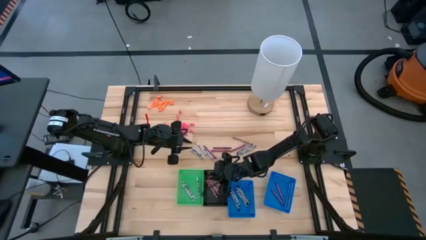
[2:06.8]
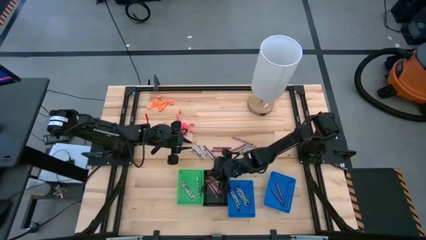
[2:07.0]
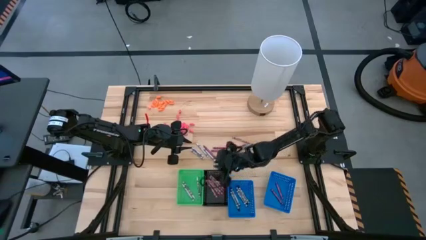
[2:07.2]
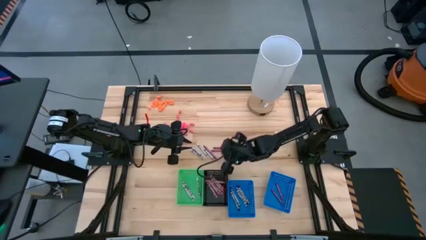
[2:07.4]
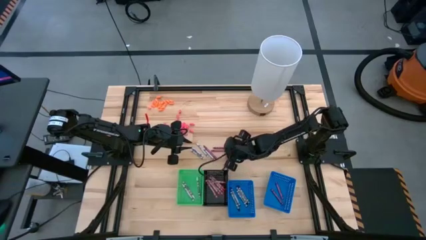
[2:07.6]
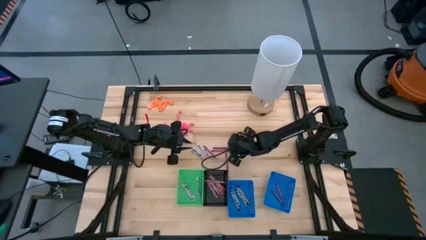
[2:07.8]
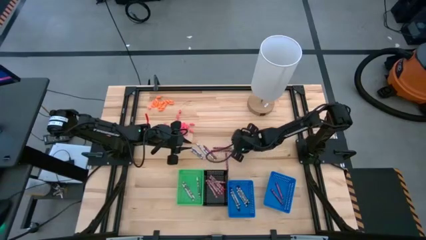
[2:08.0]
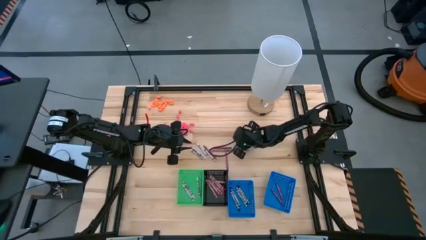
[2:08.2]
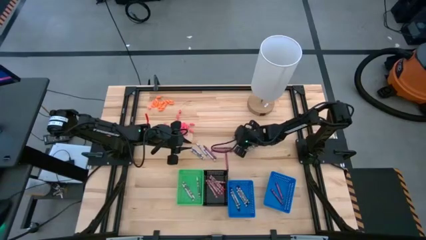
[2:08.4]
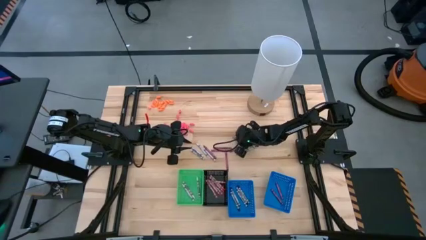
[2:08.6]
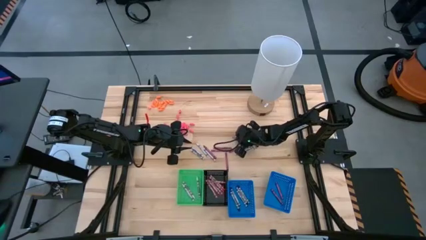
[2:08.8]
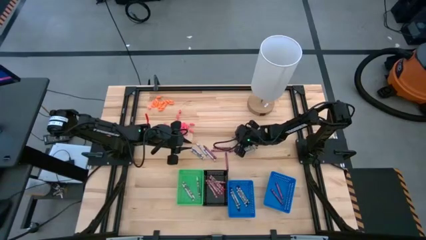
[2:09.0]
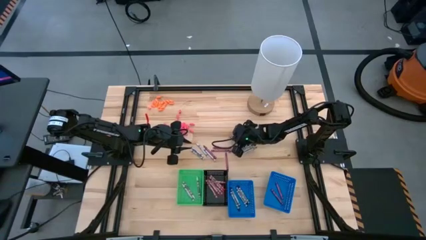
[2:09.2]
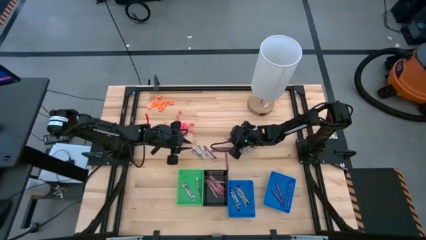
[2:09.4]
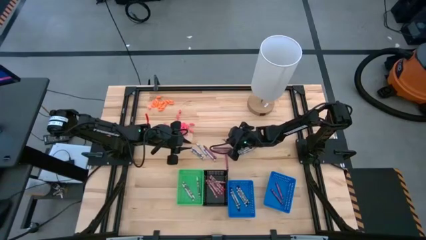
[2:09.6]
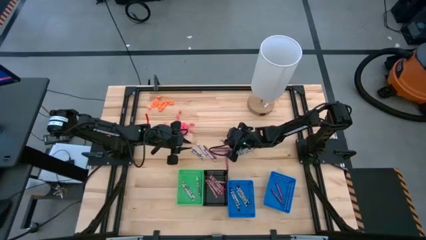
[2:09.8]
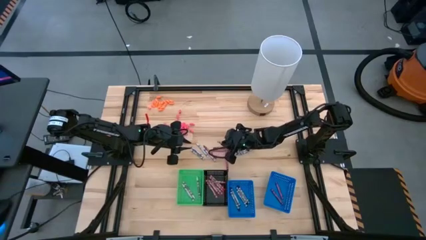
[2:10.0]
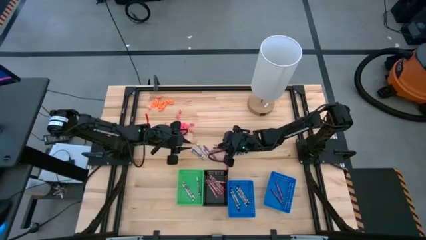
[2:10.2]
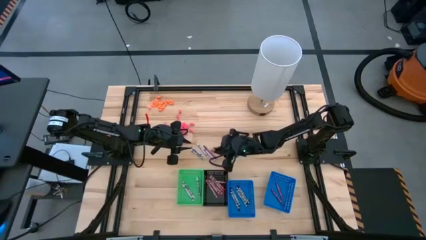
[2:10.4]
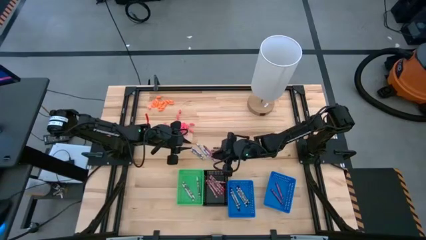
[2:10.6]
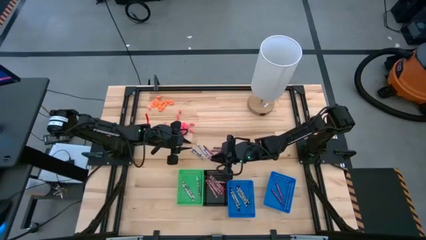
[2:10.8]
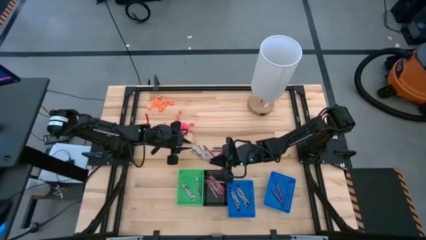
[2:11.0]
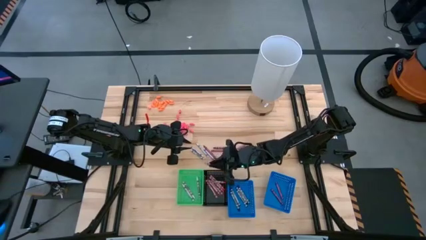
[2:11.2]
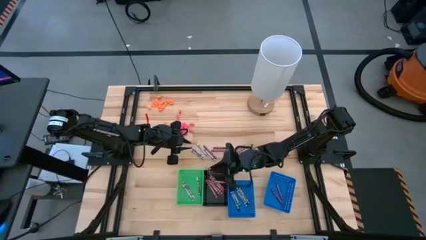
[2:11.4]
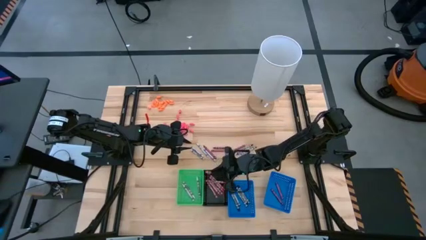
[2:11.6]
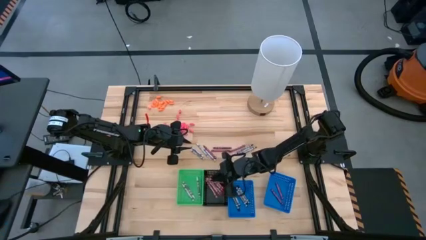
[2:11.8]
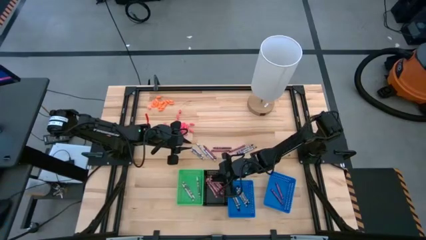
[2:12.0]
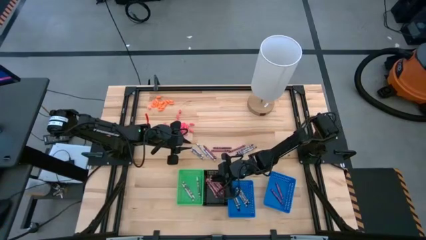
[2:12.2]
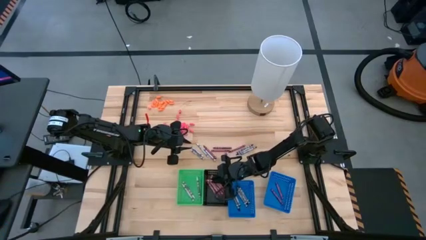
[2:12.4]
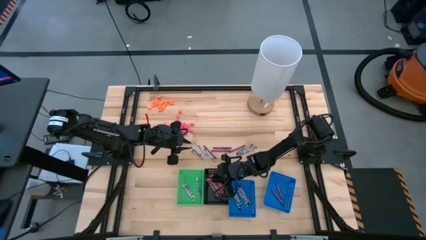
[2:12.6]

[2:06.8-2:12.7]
Task: Sort crayons
Put the pink crayon into the black bin

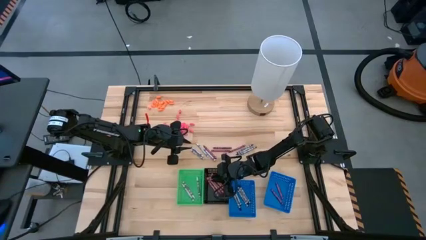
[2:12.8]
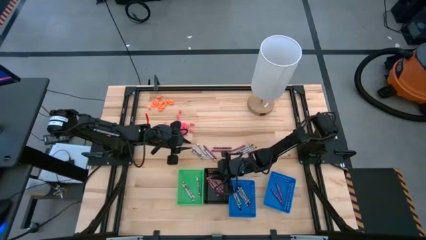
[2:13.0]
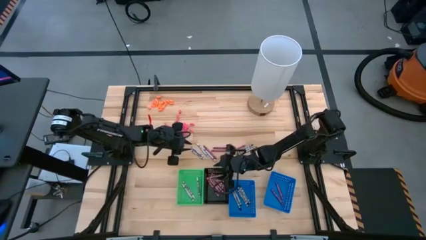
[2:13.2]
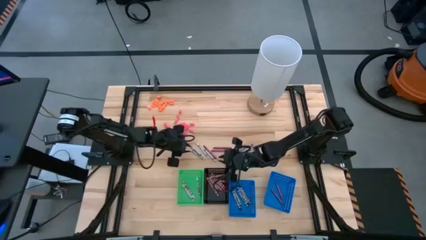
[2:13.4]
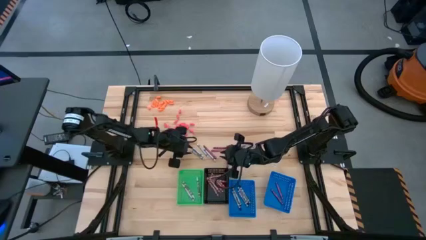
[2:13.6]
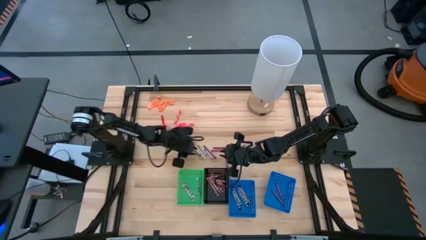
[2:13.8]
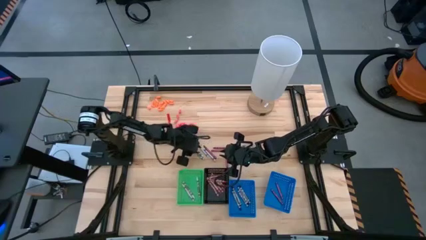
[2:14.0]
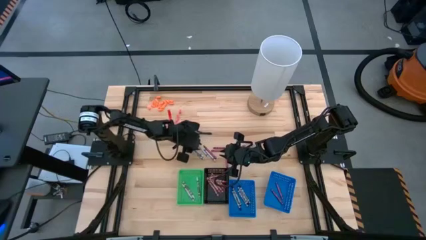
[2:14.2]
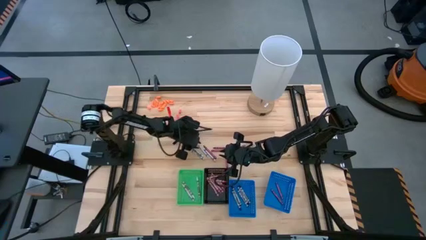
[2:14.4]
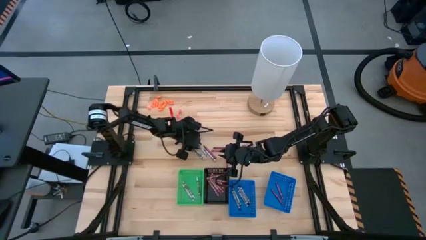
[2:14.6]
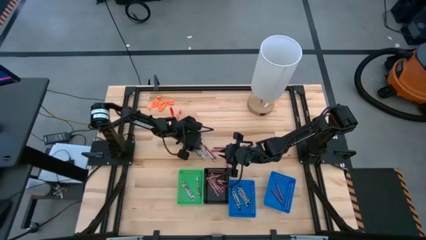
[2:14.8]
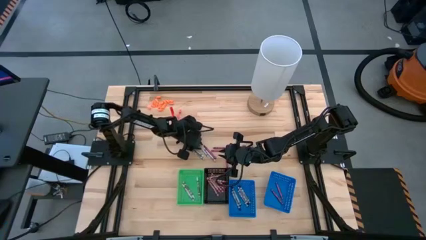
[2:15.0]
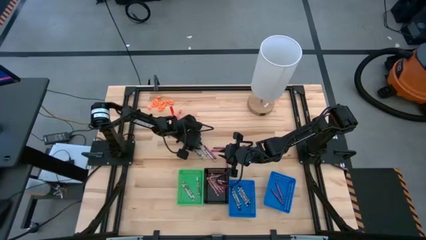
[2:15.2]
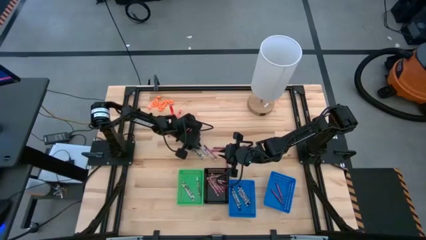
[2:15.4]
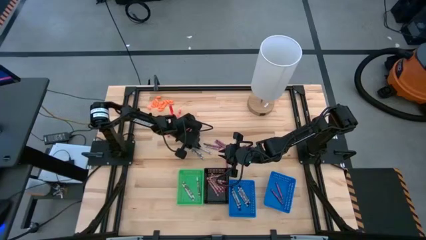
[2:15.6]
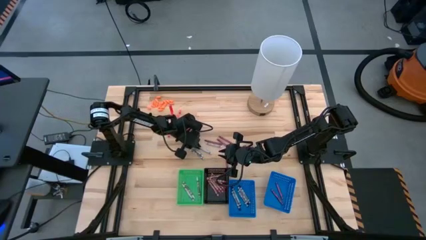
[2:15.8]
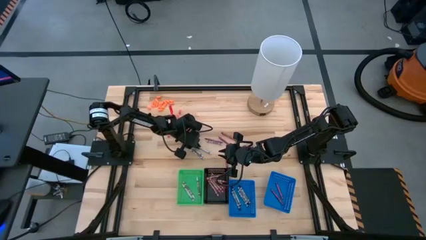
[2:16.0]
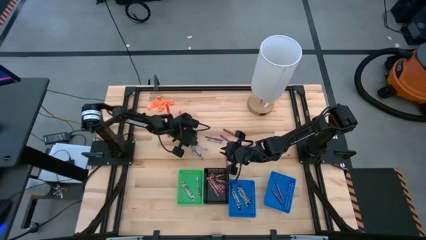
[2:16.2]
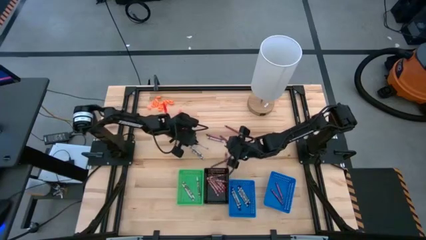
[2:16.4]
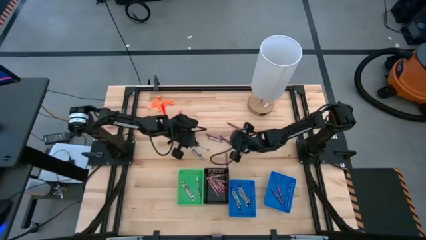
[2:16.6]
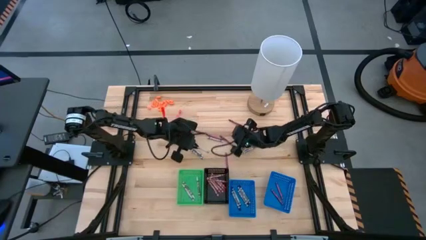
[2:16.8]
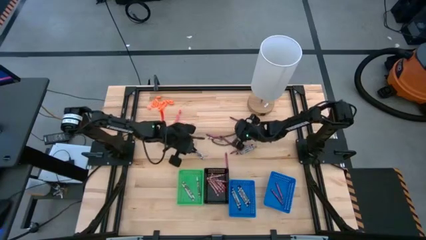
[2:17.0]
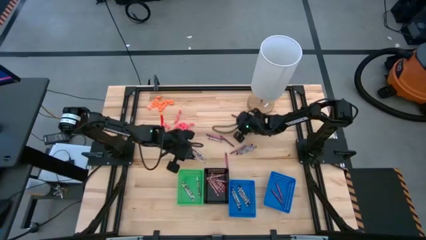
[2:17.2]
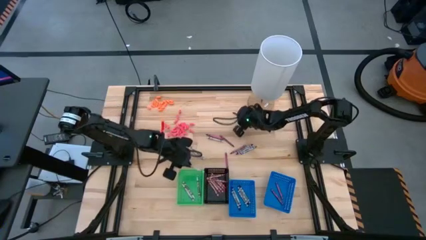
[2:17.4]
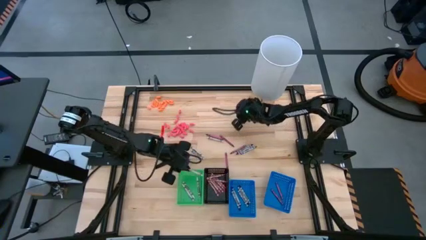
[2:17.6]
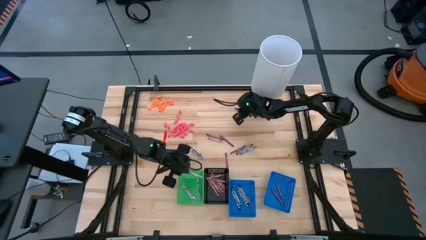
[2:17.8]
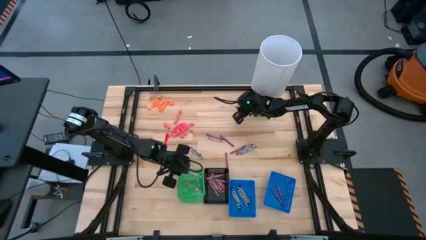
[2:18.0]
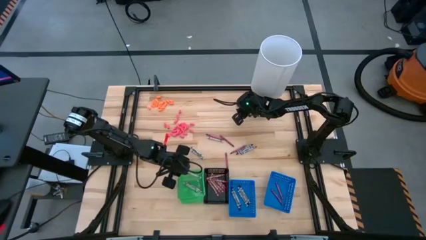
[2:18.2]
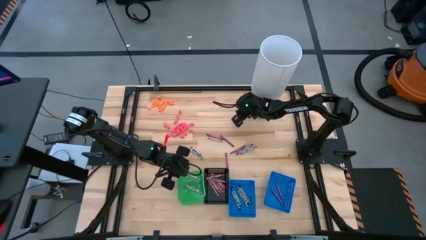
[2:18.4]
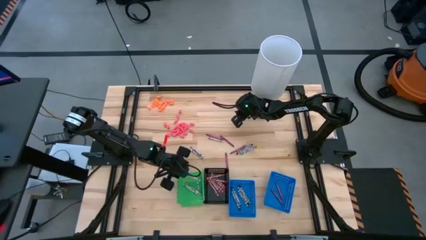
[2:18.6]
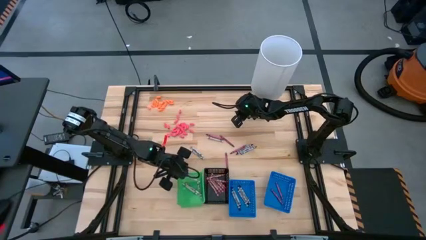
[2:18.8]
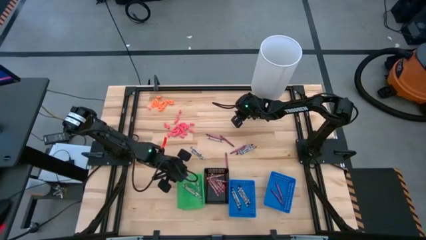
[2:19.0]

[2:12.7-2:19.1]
Put the white crayon into the green bin

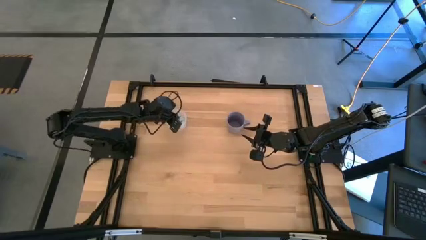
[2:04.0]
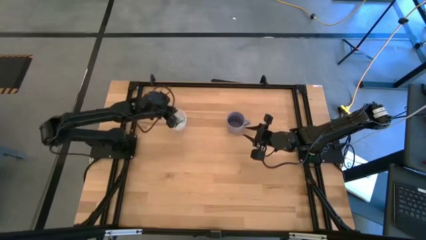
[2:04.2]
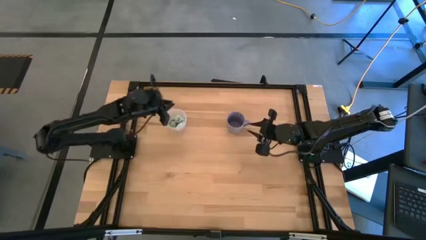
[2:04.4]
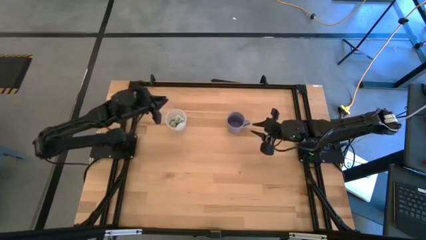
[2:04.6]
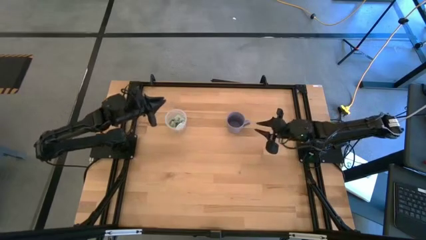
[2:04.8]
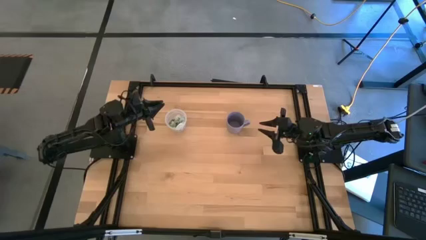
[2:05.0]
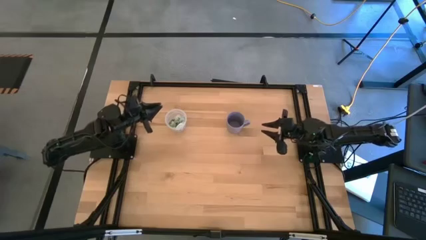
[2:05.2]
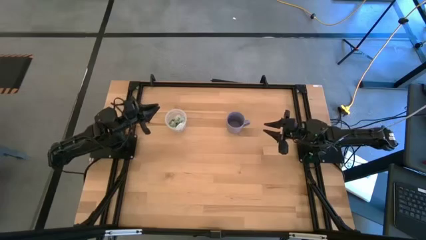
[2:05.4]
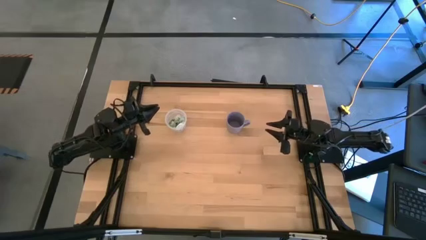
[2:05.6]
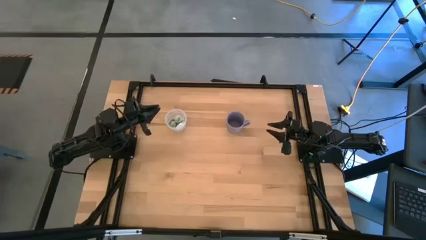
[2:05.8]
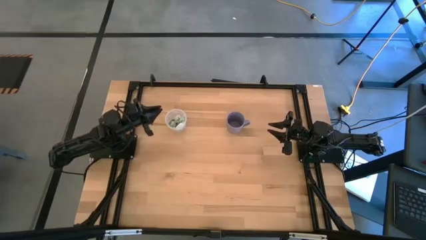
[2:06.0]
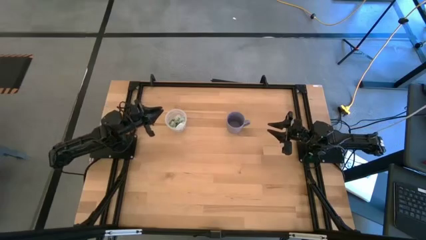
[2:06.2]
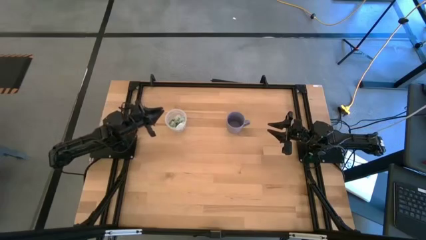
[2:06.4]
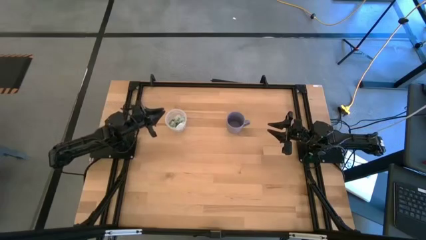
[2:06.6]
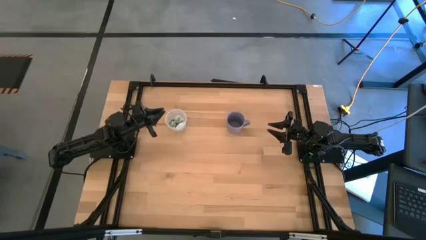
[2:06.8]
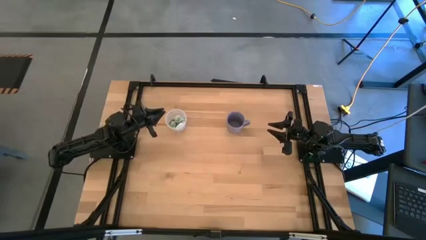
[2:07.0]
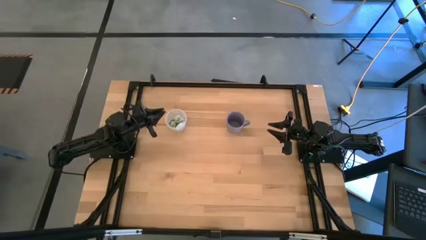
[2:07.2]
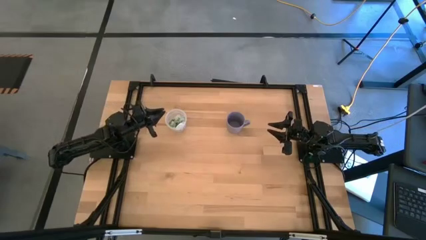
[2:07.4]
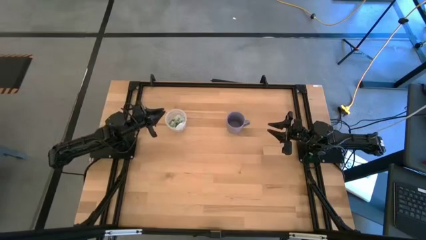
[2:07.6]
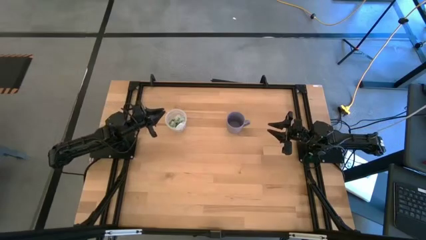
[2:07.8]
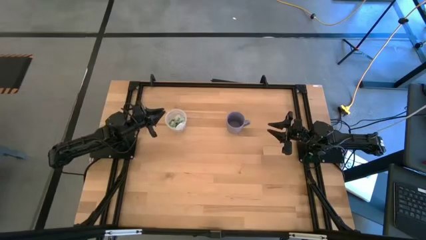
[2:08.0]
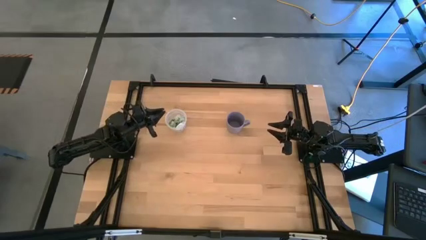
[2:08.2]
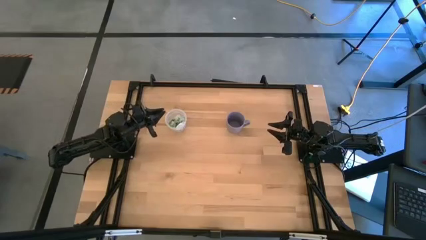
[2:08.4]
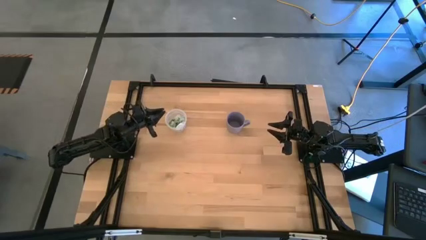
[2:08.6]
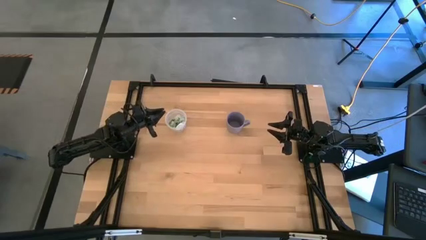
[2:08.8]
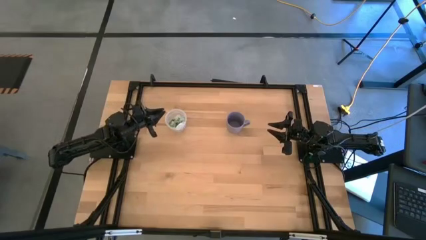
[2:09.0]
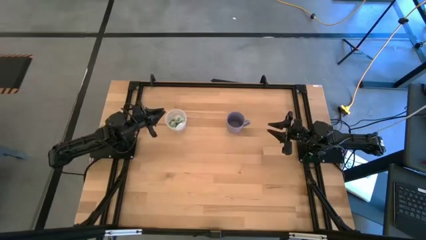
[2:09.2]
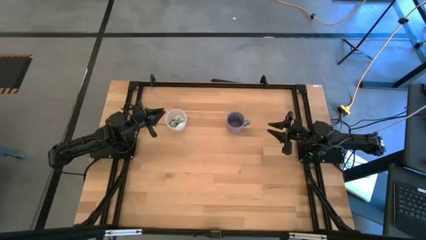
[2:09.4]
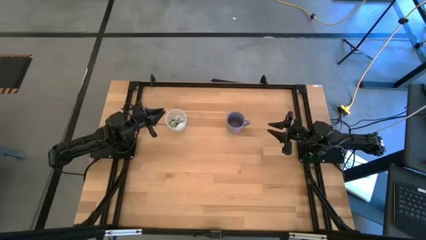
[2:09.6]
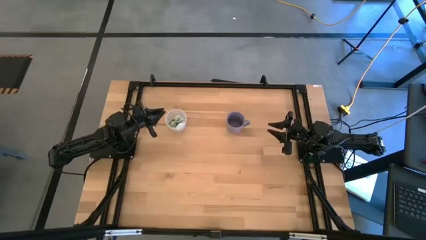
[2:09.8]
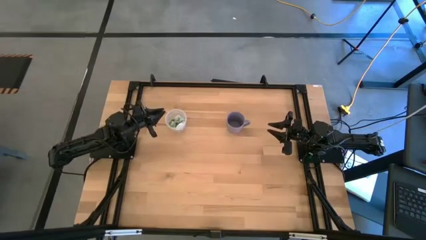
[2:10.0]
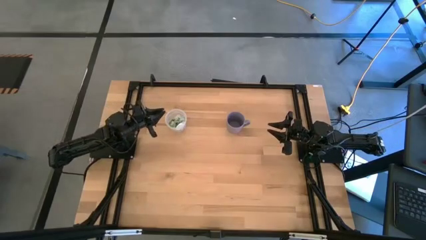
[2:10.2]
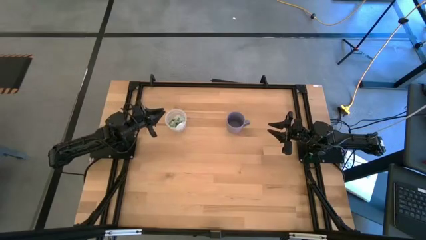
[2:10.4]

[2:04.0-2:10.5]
Task: Pick and place Stevia / Truvia into bins
Return to Home Position
